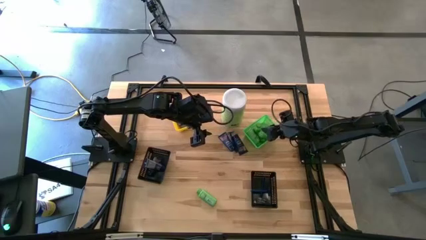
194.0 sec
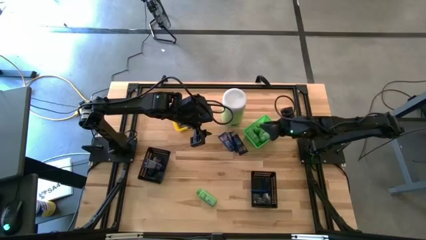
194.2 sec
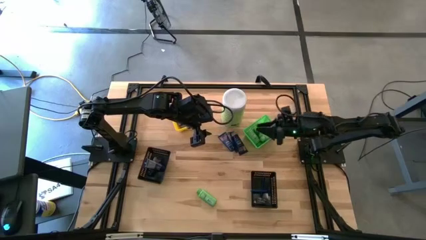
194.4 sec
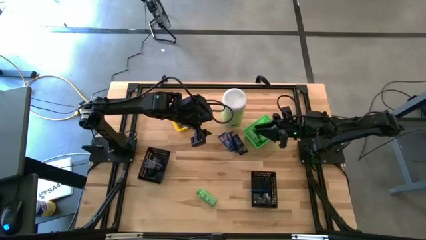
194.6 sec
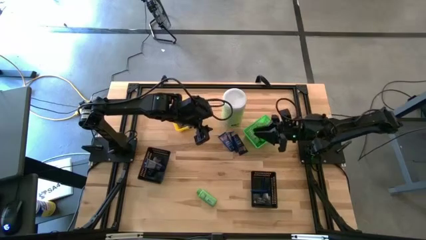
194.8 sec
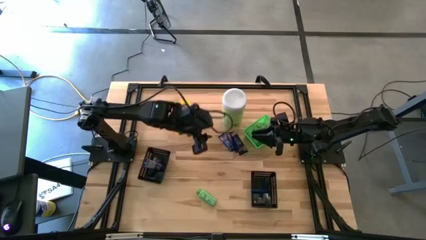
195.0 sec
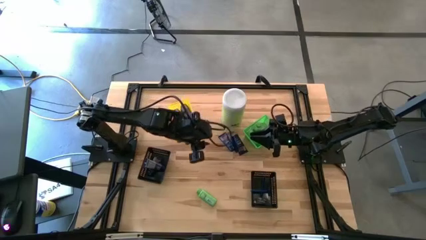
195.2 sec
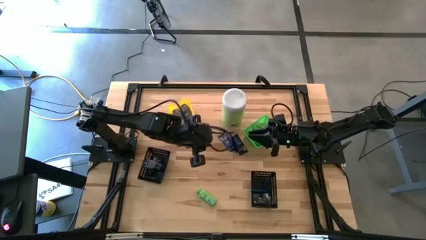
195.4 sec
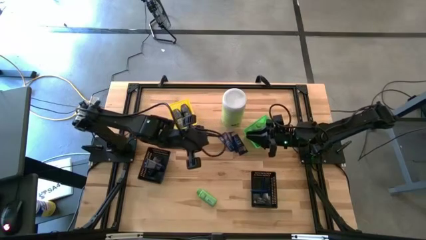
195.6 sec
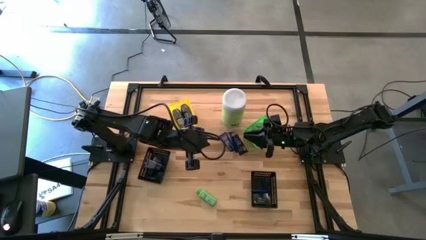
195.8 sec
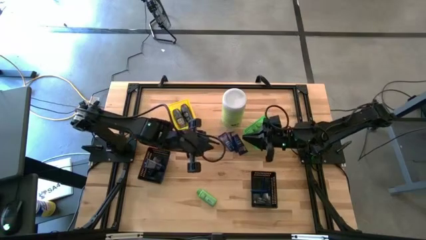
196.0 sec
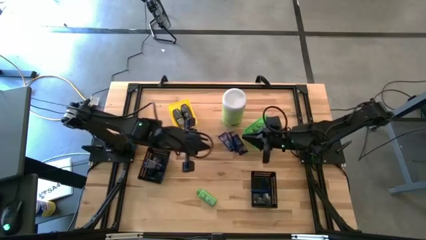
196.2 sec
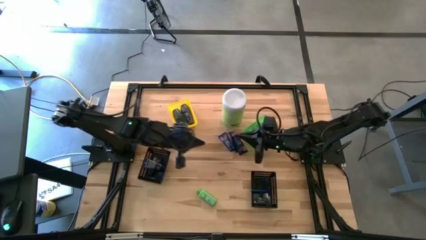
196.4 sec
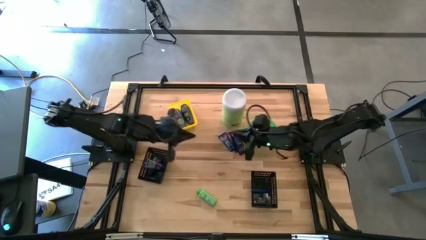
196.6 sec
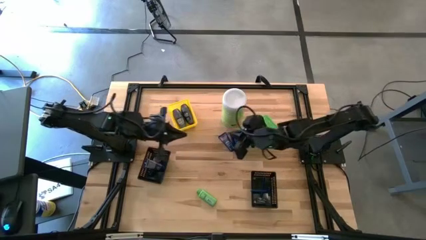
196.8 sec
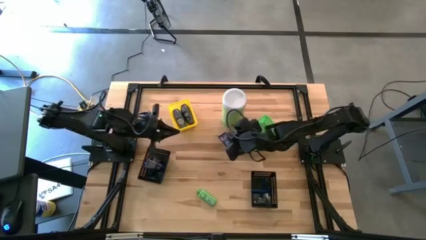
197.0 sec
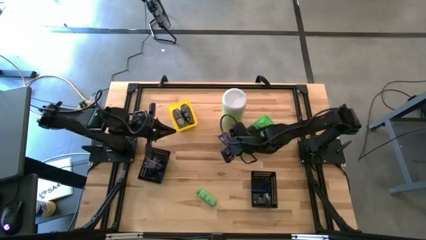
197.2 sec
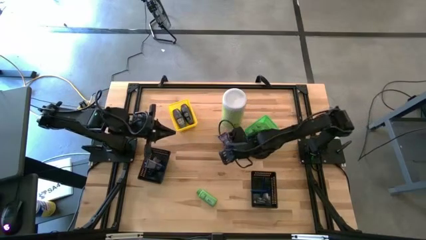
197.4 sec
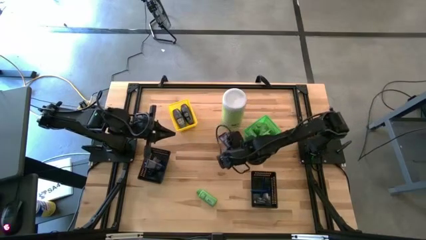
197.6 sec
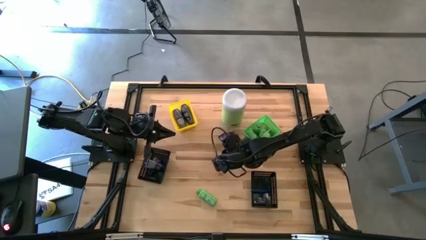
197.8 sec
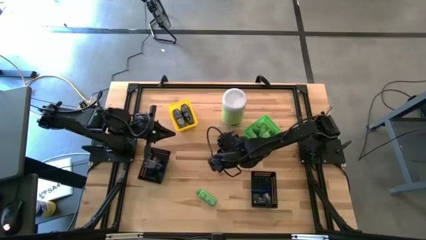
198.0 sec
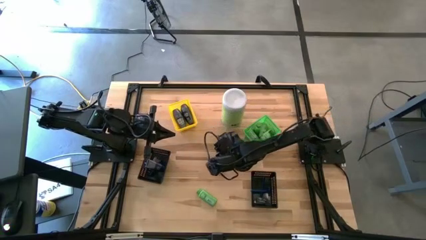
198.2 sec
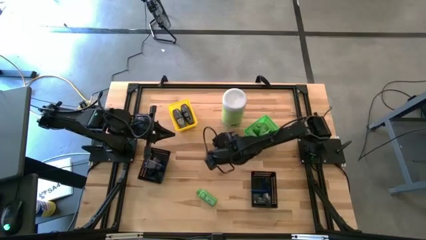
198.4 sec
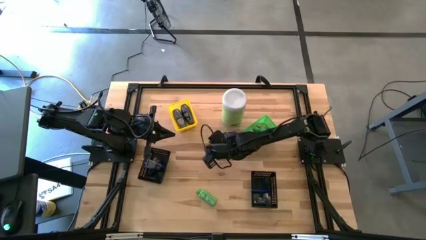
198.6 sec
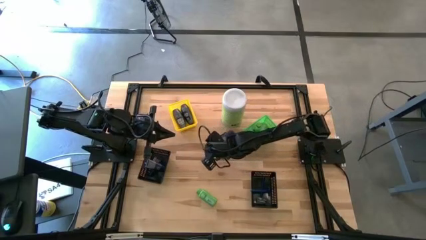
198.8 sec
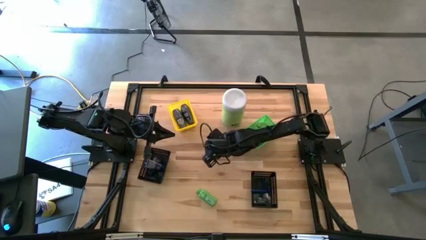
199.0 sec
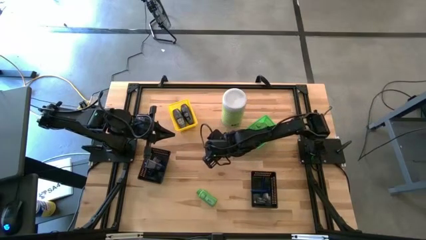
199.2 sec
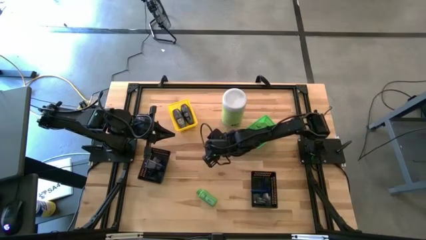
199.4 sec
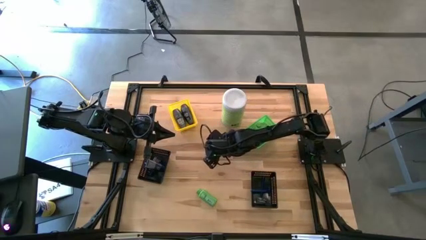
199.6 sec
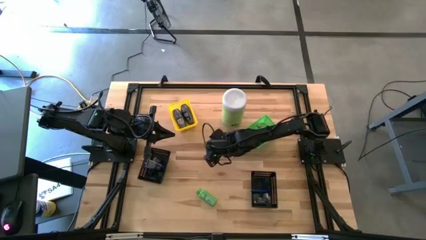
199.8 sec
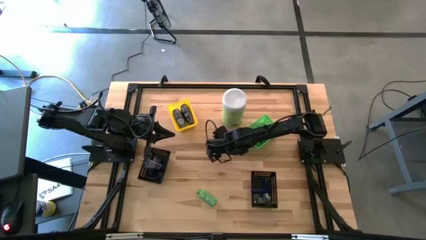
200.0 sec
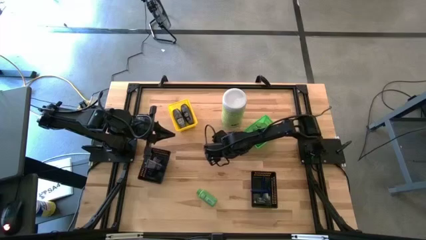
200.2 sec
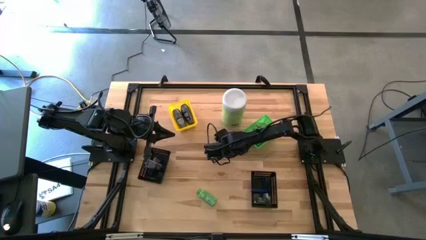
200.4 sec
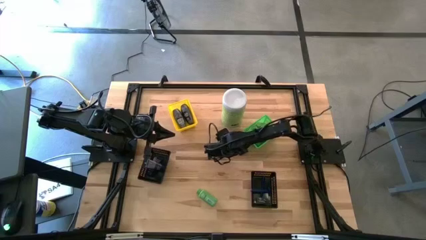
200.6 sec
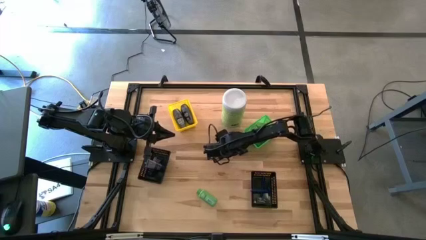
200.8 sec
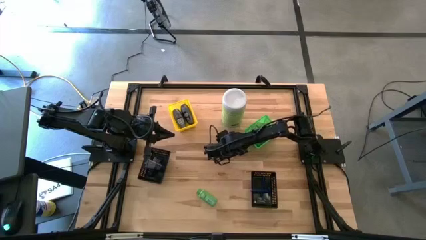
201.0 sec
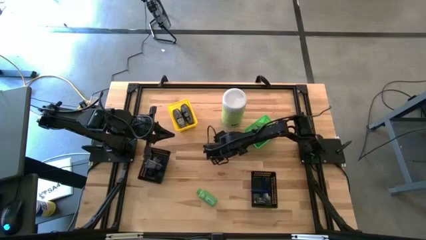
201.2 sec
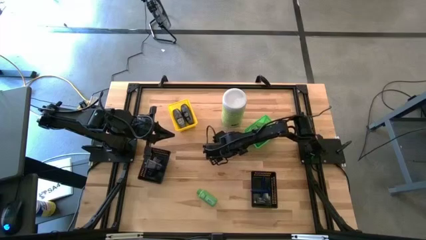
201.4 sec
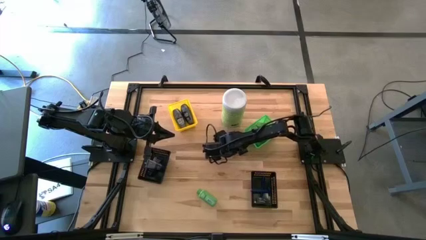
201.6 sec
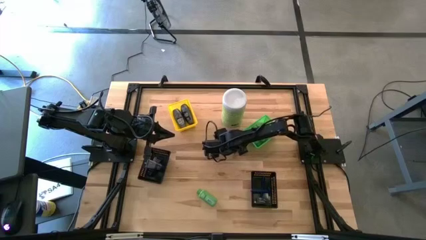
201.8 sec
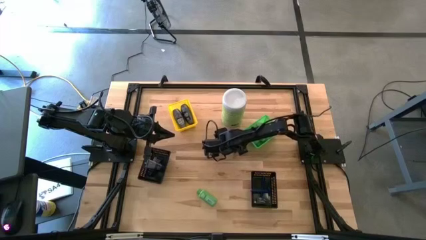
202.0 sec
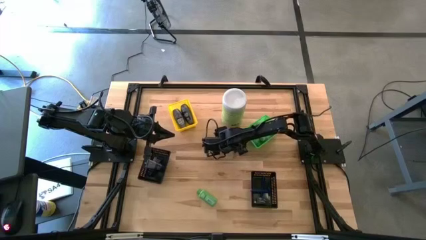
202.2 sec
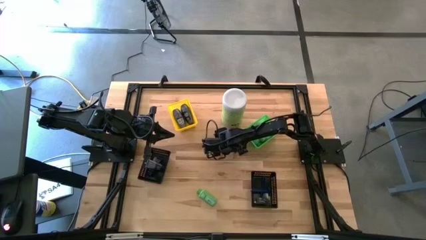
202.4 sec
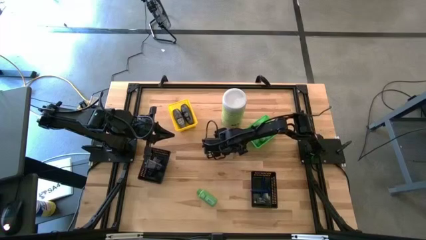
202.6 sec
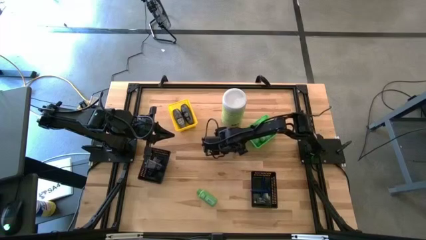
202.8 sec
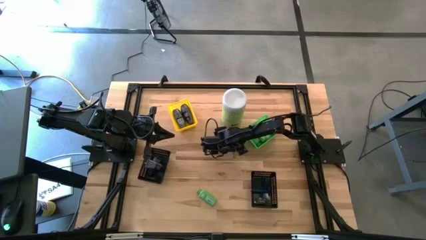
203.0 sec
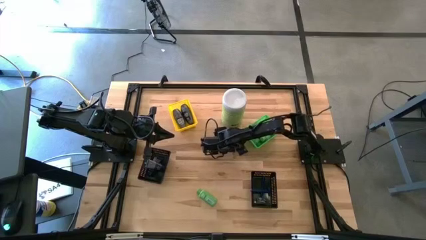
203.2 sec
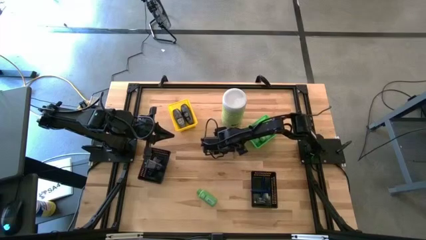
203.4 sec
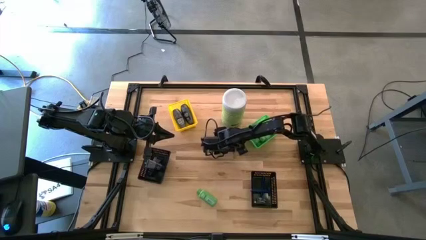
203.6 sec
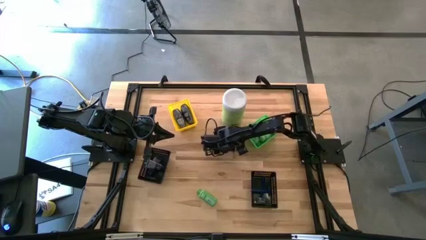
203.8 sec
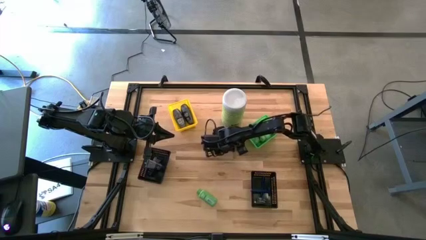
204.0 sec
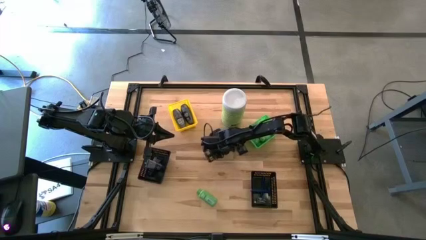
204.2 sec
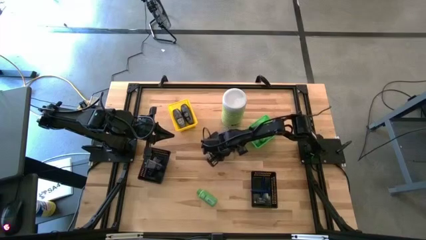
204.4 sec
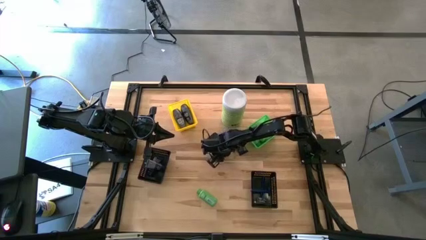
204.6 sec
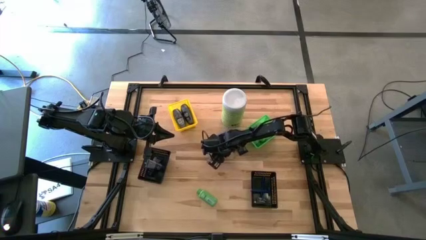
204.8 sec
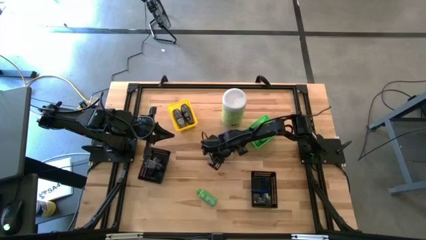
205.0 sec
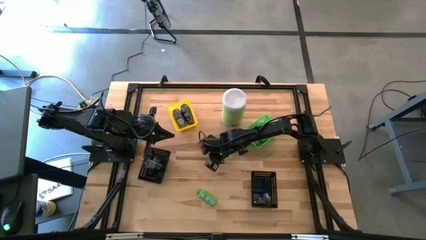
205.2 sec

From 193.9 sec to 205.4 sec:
Task: Pick & Place Travel size toiletries
Put the shave cream into the left black bin

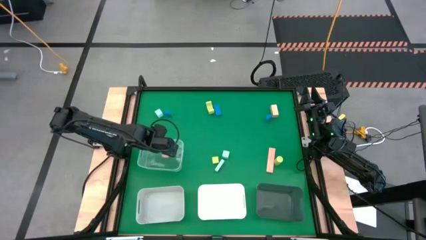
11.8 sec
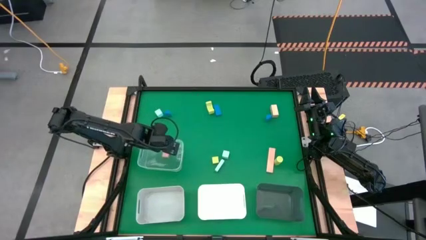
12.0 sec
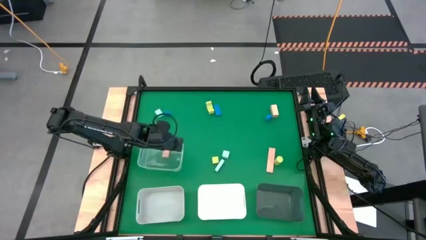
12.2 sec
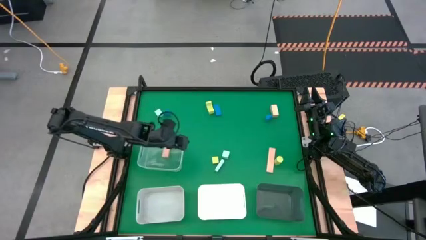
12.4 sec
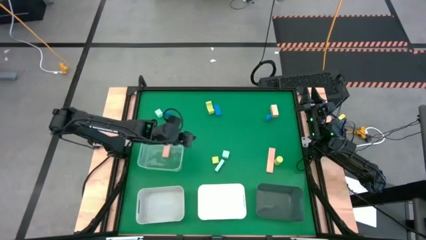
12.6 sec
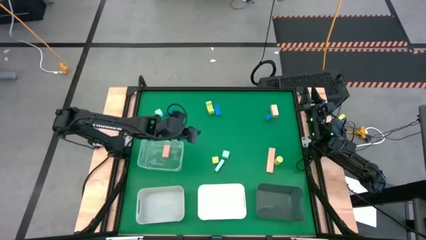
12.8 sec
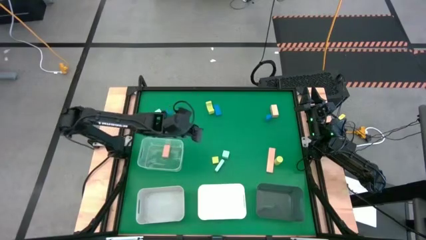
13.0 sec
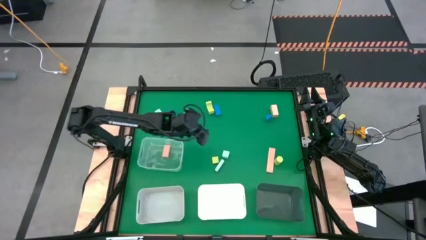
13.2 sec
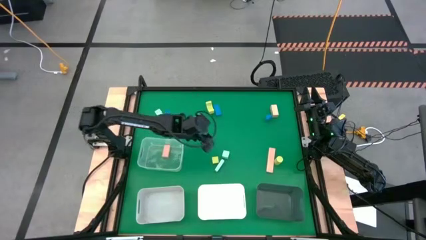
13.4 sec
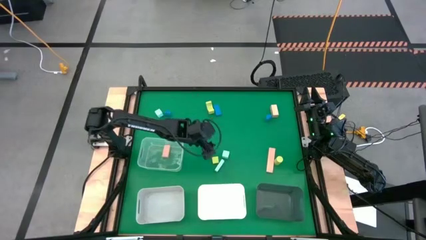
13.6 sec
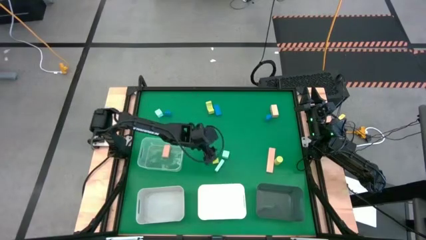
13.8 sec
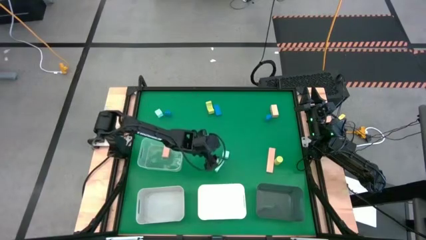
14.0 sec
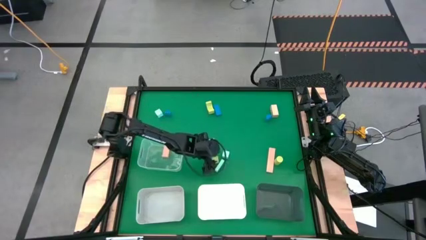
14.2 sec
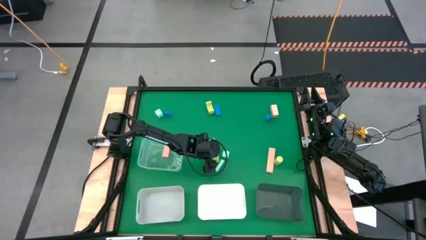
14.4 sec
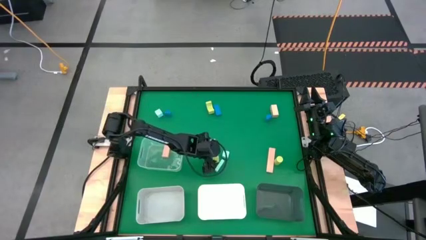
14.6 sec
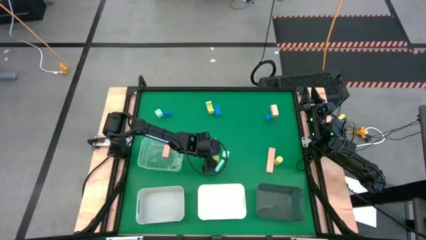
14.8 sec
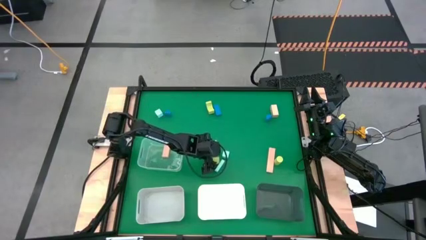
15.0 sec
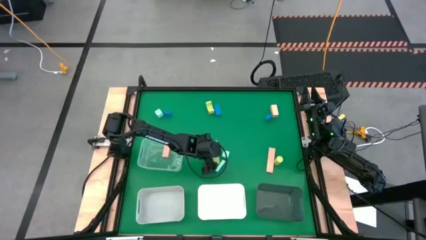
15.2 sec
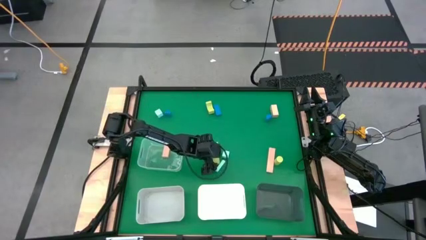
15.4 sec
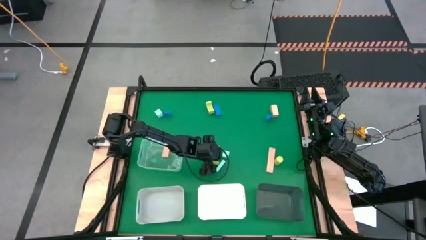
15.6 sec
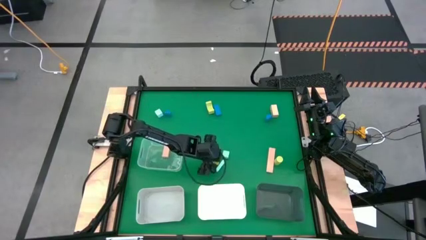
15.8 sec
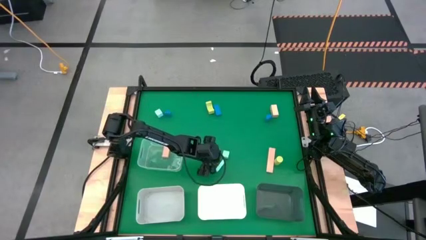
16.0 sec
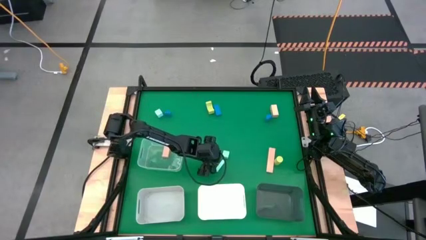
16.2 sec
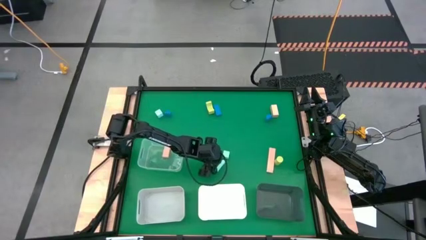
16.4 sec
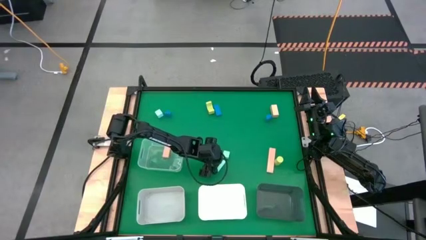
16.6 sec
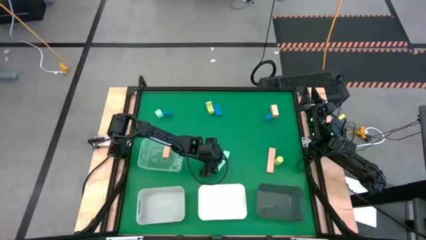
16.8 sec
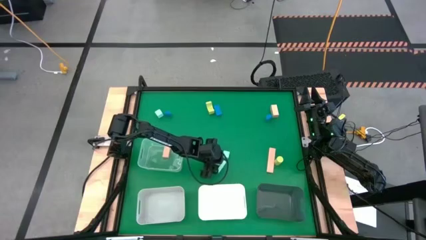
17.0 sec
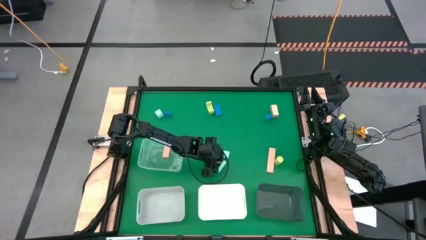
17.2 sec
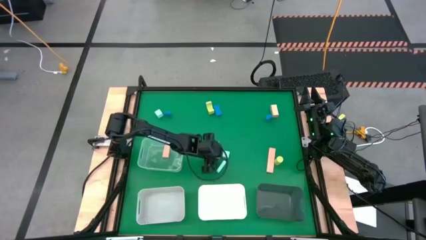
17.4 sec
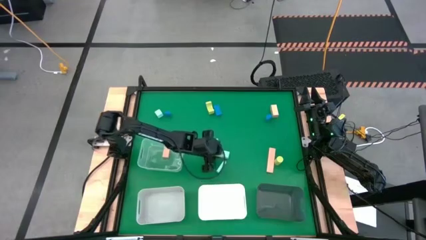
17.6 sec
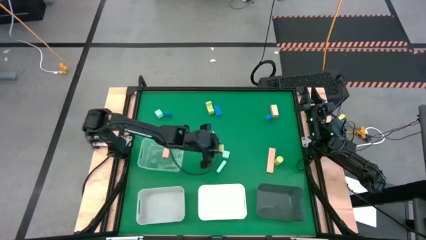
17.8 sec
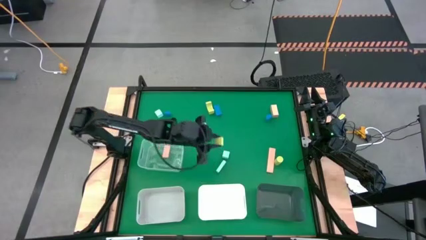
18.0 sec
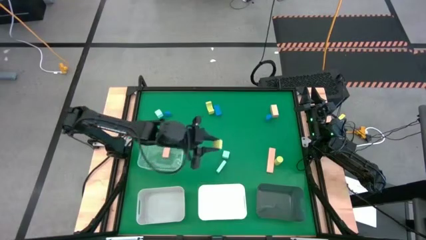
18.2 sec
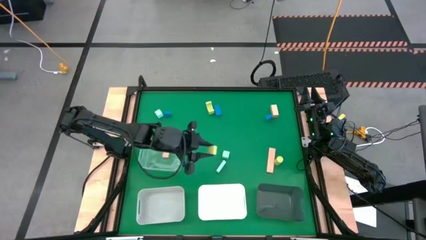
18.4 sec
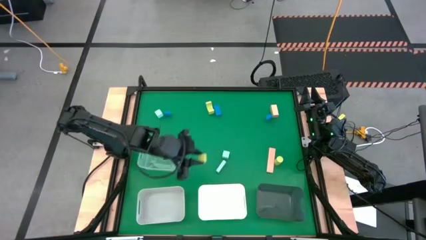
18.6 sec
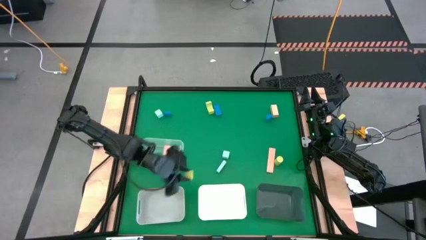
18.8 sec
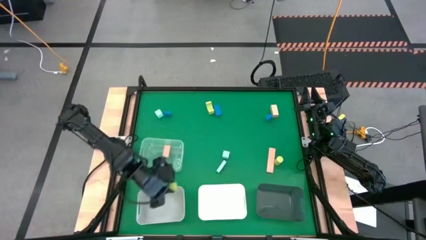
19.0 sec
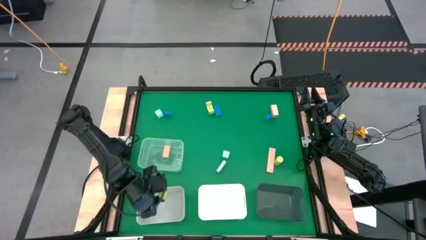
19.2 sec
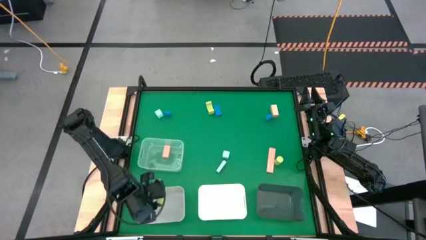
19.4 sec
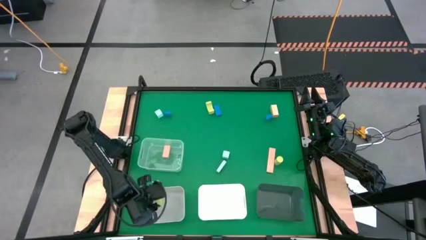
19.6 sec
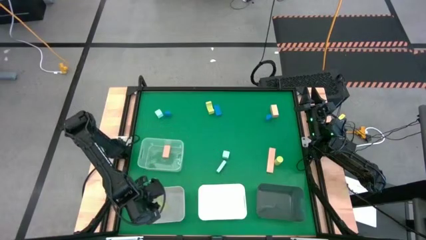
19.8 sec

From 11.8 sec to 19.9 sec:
Task: Sort & place blocks by color
Put the bottom left green block into the gray bin
